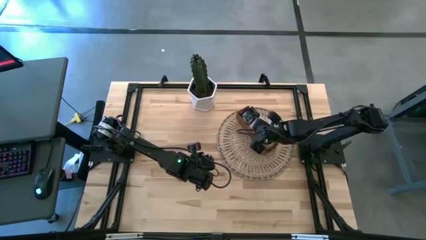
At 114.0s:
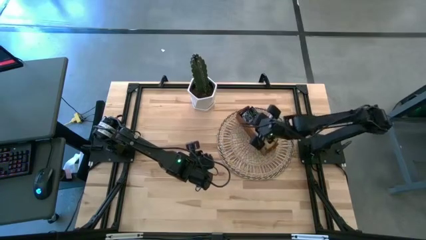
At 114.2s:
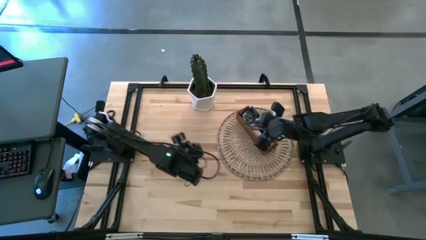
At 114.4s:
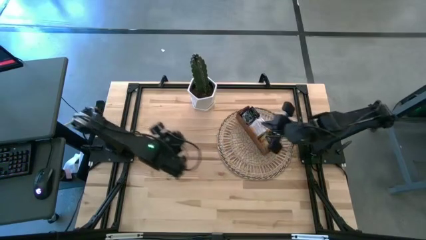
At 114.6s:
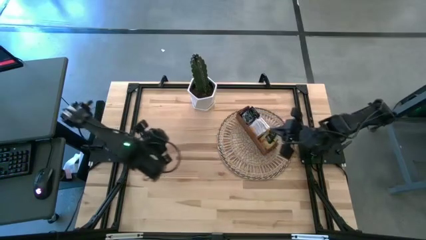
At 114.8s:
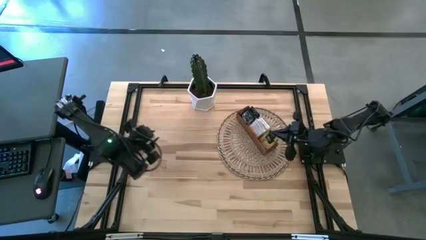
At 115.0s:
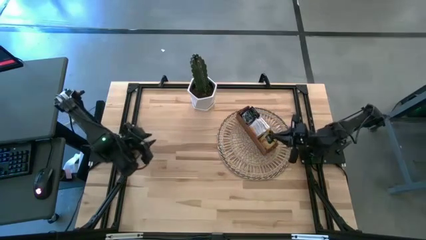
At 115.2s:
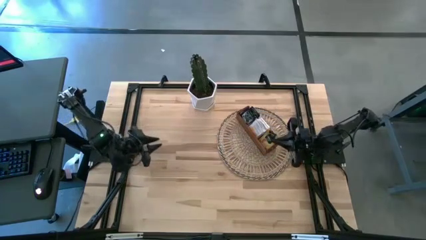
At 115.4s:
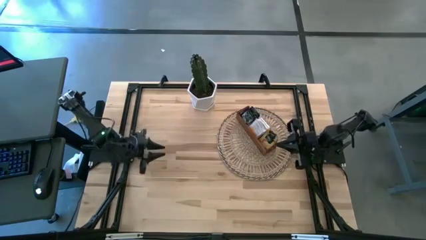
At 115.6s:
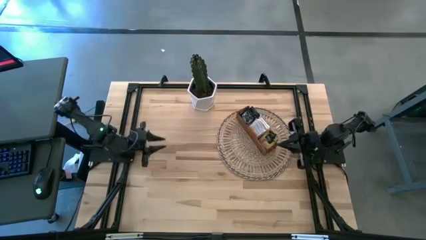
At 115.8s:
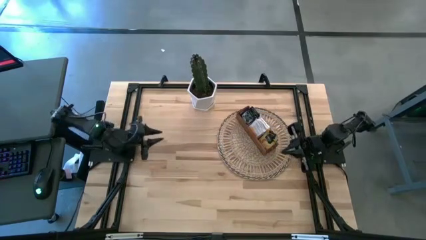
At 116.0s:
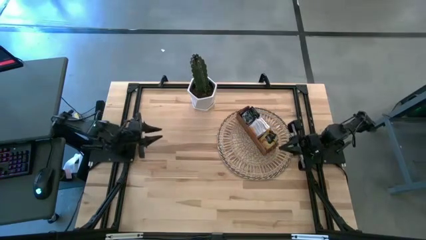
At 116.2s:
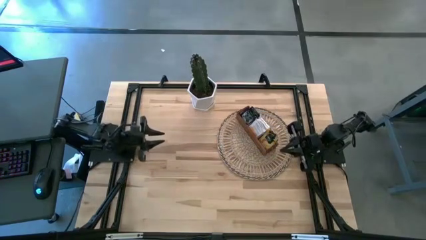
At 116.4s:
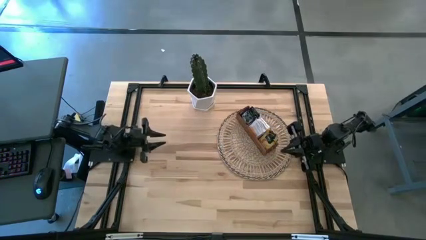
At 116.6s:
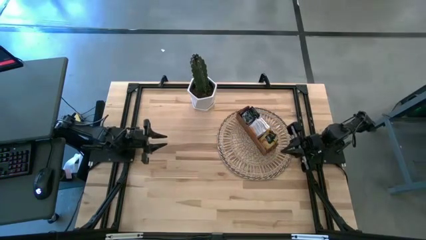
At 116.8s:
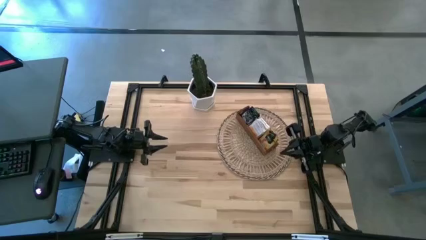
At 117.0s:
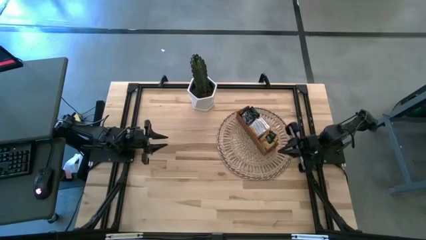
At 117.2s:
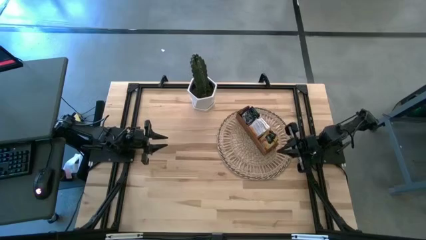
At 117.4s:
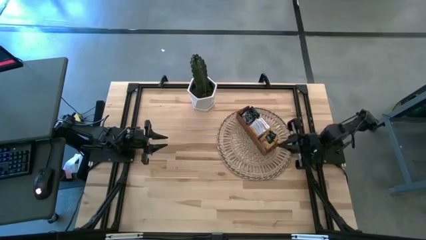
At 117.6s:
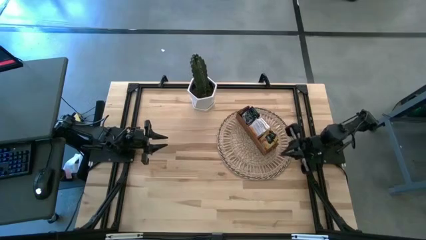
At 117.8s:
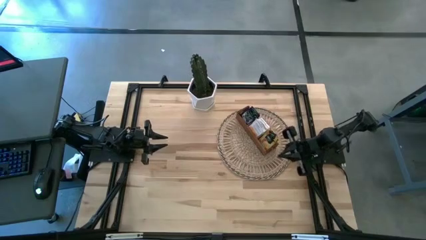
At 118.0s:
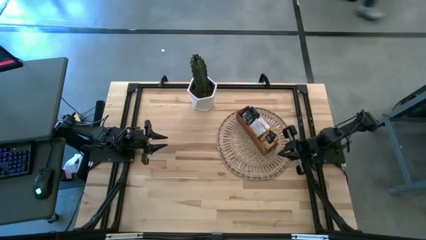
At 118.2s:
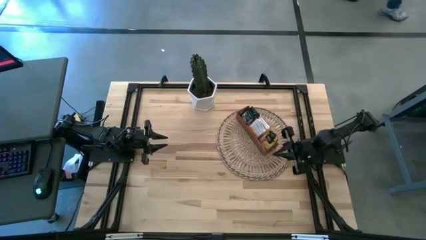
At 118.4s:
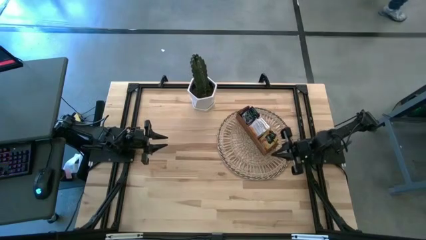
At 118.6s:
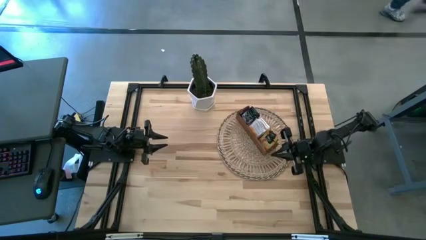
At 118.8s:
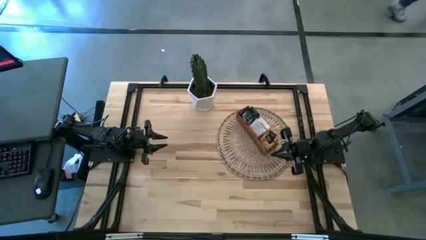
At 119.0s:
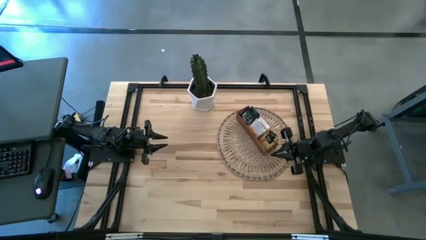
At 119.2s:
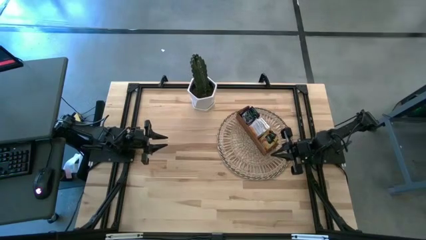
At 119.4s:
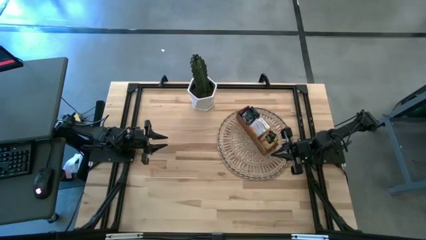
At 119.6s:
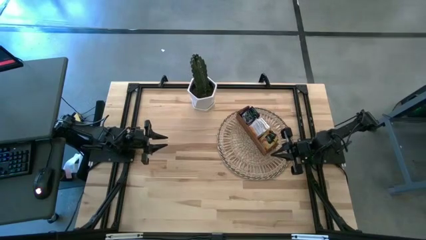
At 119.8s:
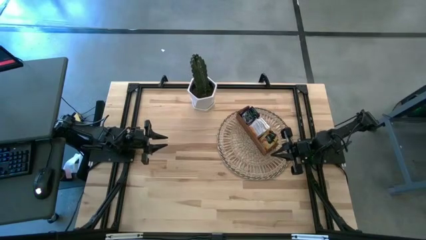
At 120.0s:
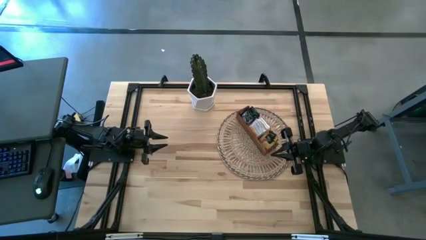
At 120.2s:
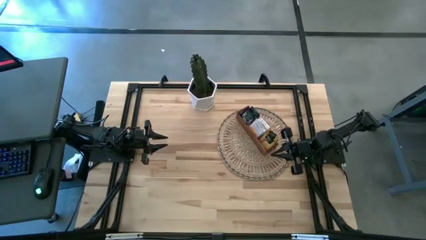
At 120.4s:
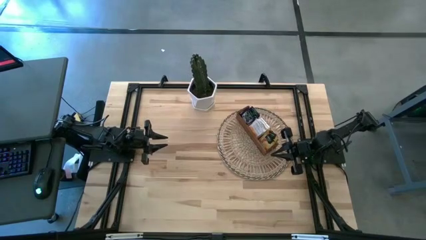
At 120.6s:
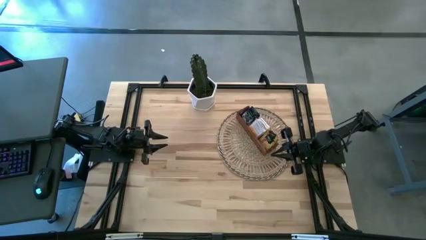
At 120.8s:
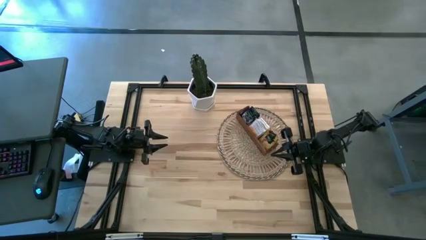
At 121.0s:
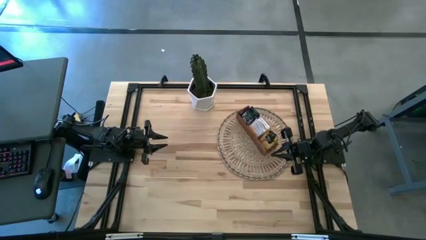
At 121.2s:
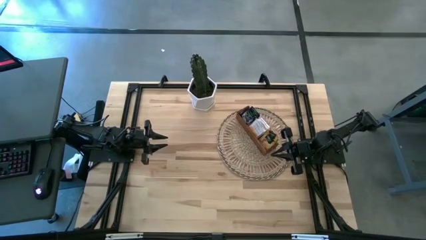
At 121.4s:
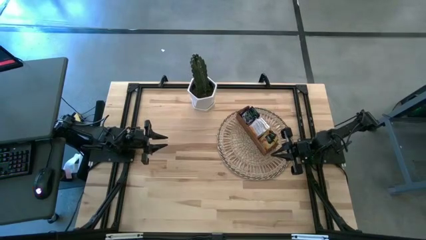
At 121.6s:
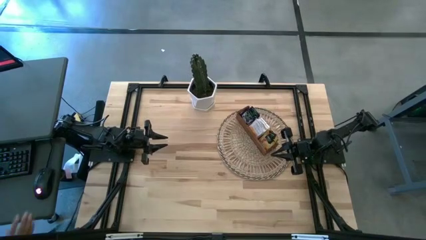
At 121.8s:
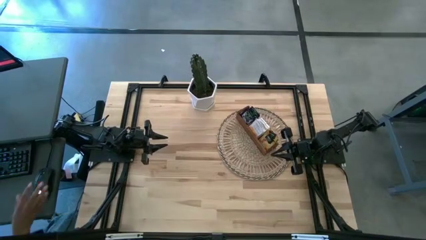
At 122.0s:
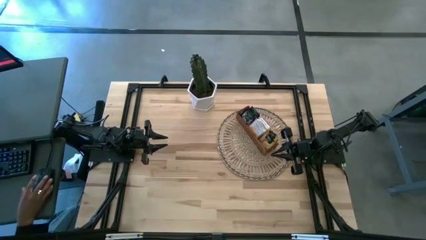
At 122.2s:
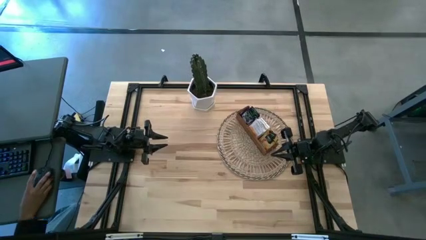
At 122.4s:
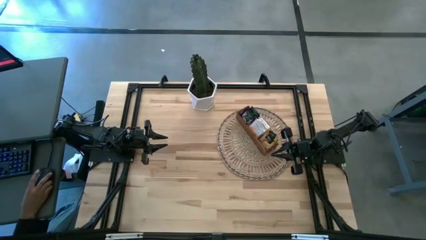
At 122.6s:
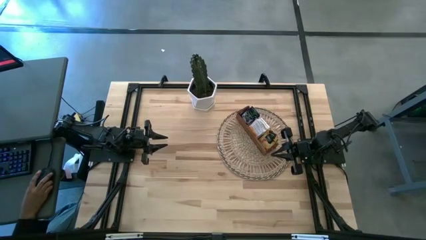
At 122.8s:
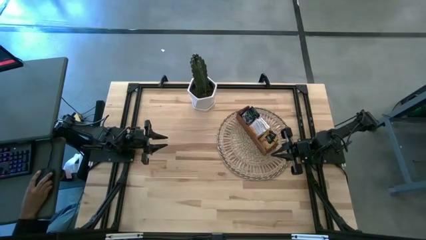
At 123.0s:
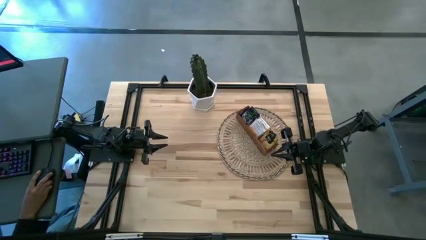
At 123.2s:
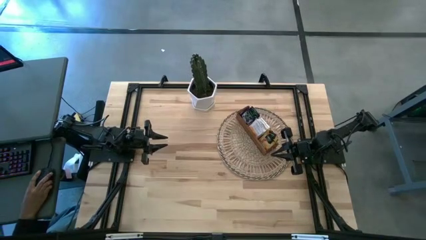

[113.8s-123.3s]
Task: Pick & Place Tea
Return to Home Position

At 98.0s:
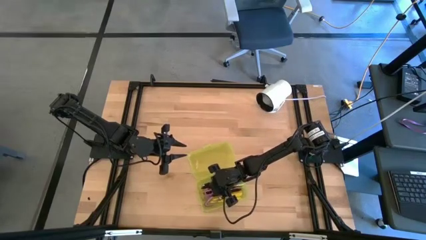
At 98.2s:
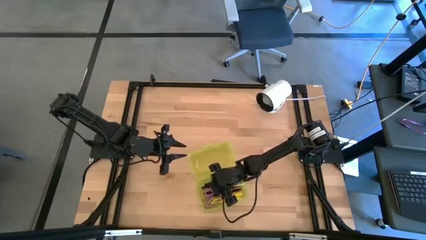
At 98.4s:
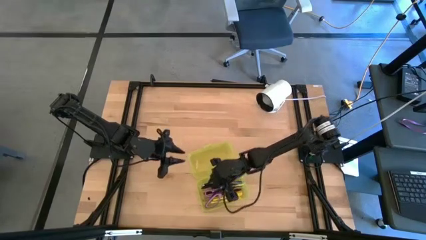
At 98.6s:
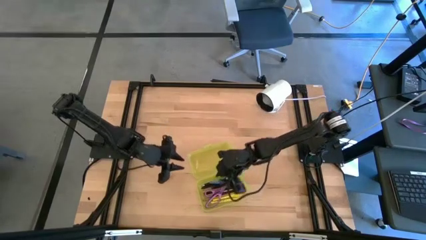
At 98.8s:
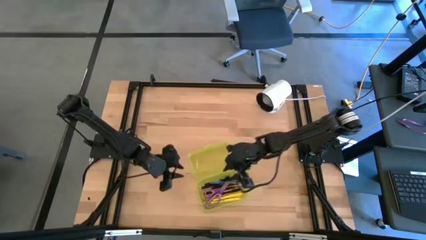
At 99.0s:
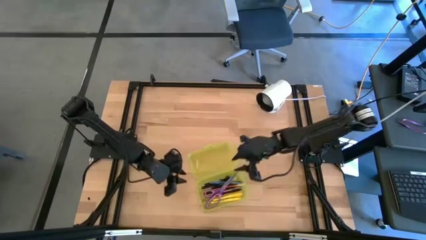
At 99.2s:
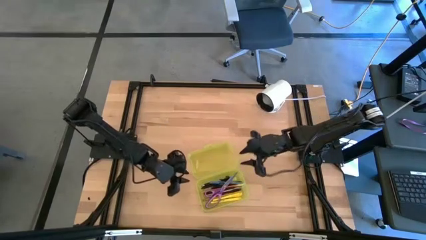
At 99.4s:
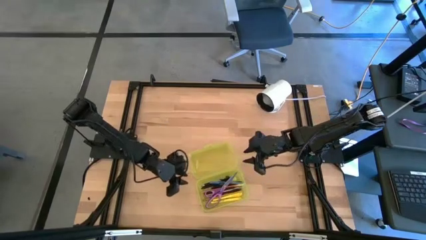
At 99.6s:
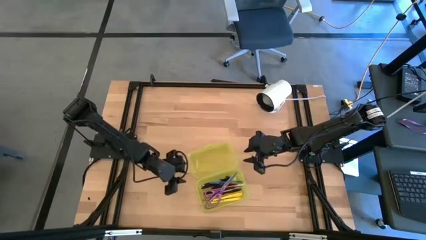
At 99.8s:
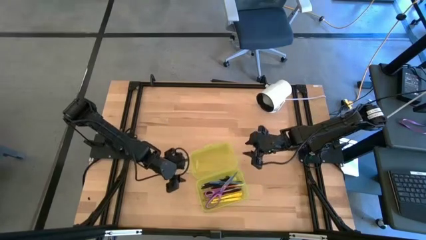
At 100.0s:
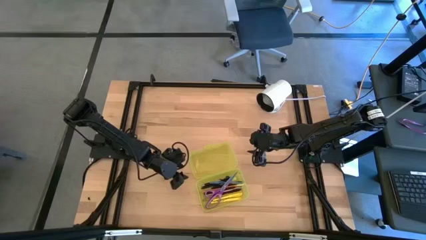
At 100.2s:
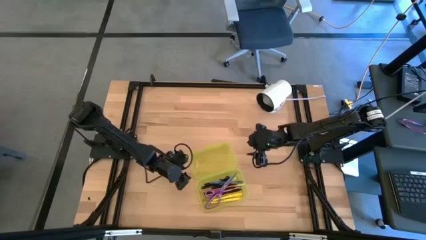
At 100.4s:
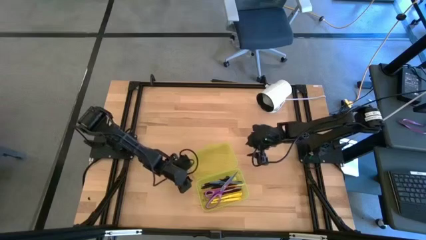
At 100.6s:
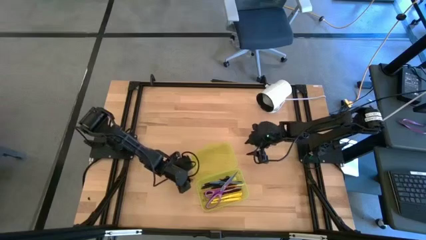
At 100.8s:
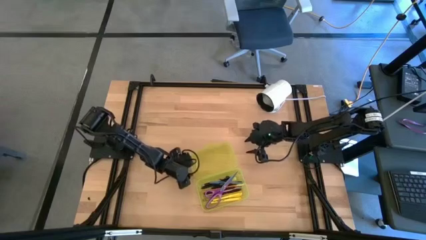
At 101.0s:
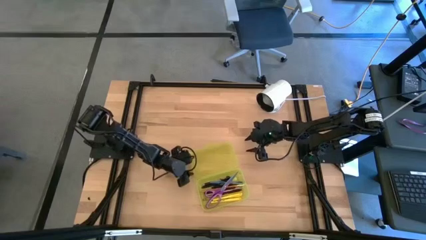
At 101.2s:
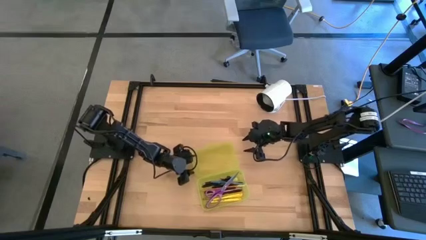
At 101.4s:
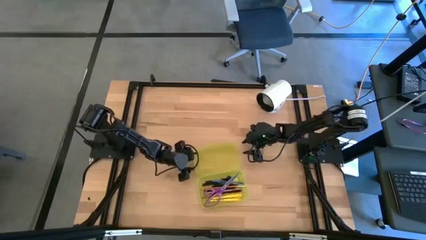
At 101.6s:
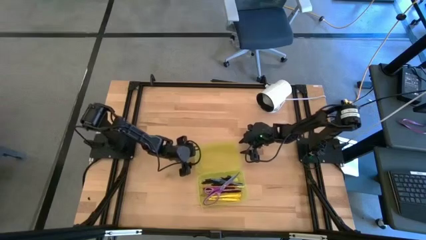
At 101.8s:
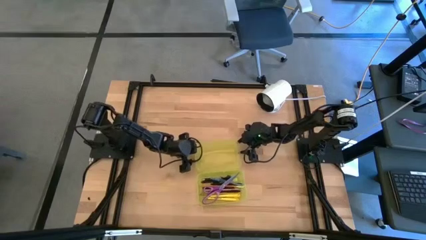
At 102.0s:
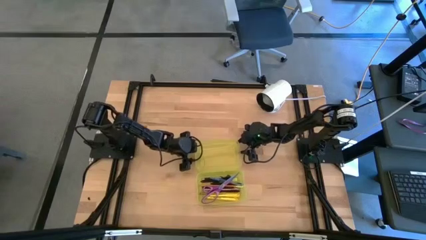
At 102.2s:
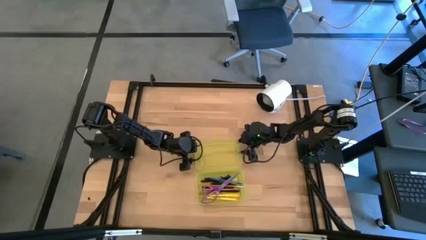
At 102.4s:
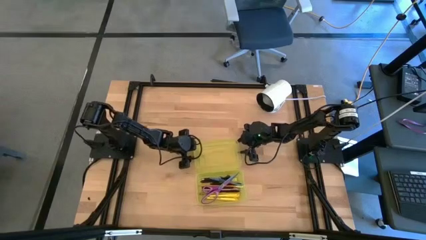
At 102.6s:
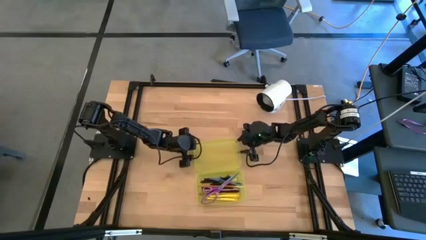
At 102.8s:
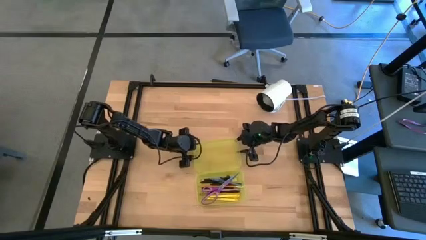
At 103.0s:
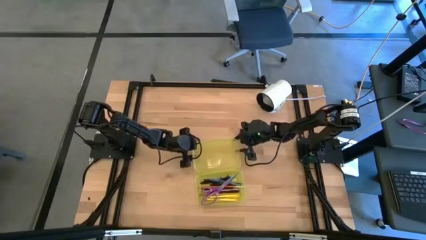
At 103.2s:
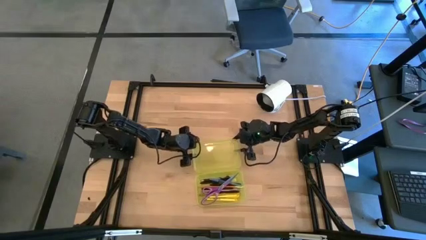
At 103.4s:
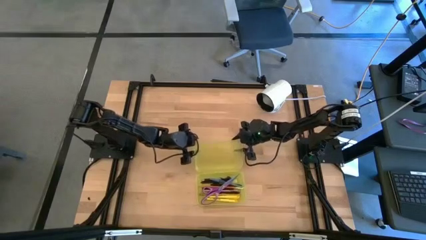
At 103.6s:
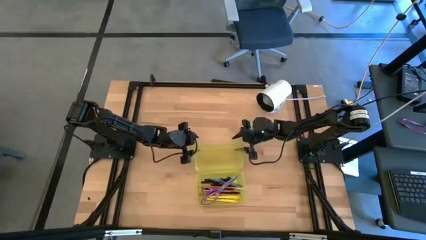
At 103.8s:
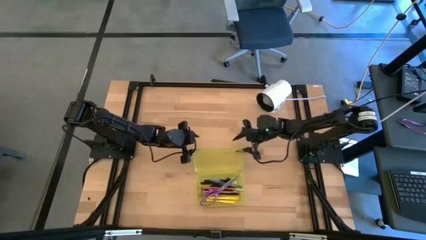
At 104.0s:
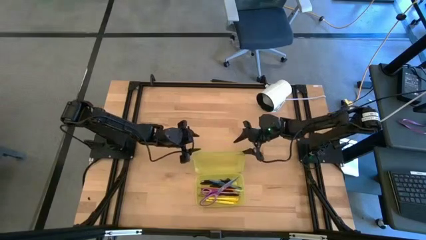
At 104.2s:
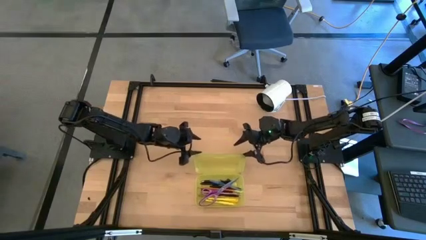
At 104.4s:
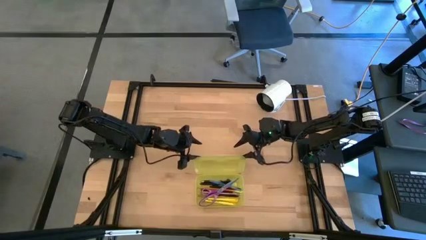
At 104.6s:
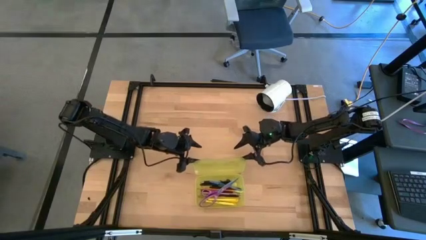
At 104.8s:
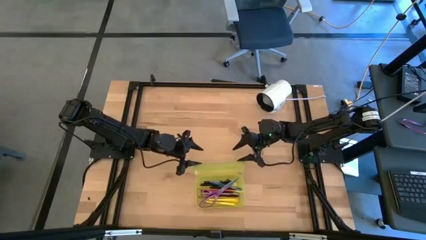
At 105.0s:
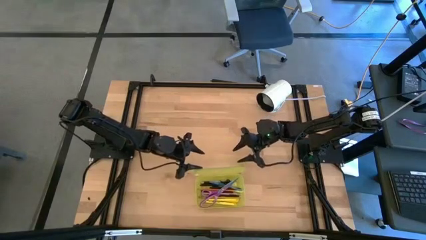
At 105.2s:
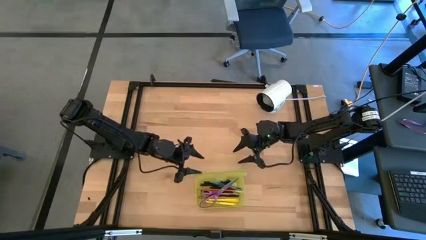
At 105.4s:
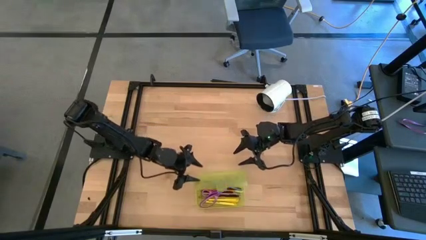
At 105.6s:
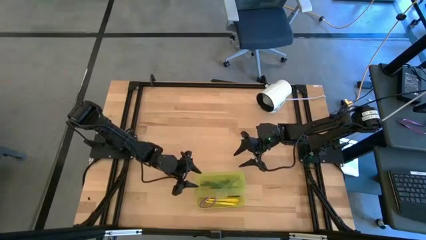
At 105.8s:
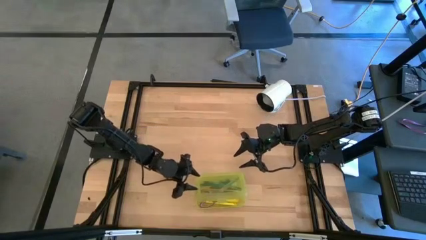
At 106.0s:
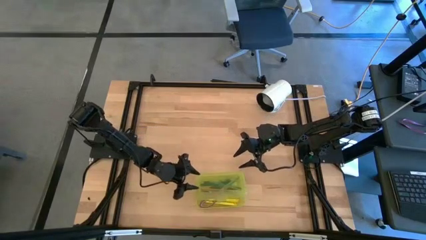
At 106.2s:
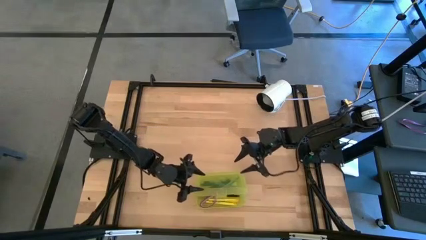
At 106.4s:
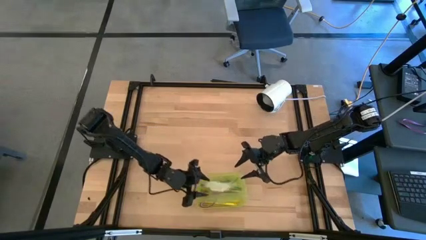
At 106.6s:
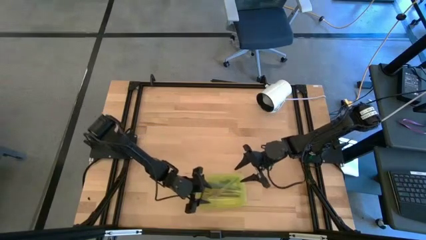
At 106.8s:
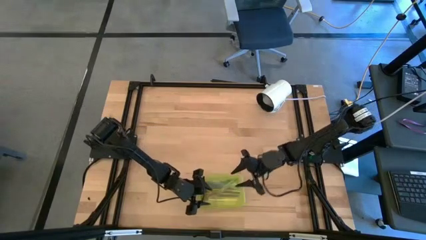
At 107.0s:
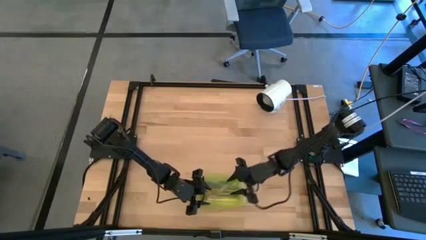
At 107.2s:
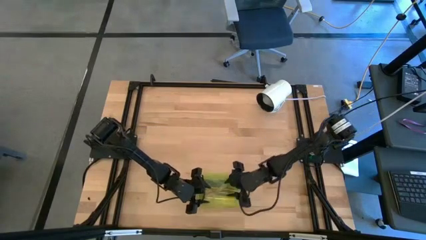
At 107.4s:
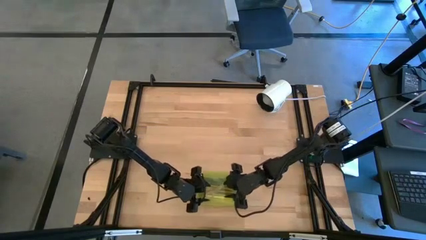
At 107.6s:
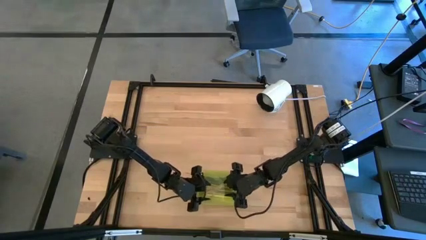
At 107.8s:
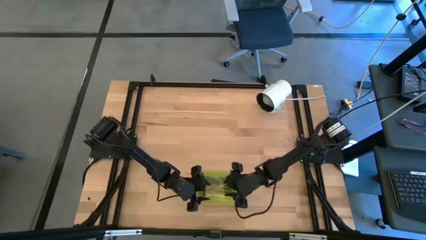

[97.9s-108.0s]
Task: Pick & place school supplies into a supply box
Close the yellow supplies box
